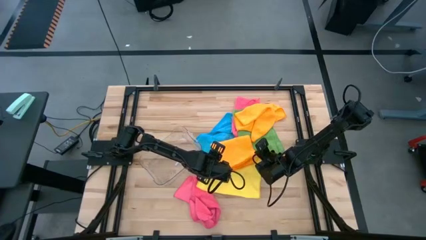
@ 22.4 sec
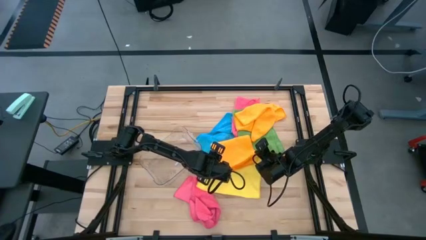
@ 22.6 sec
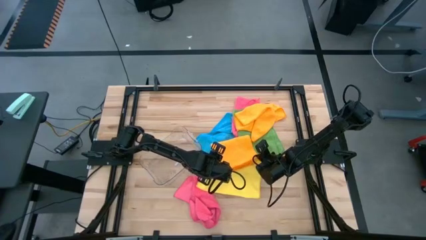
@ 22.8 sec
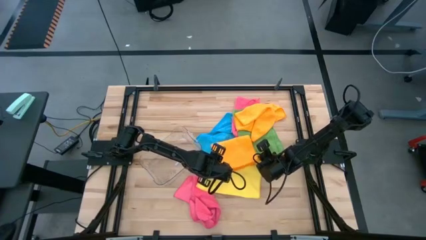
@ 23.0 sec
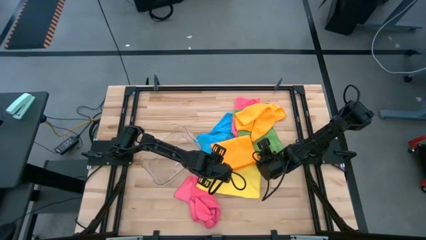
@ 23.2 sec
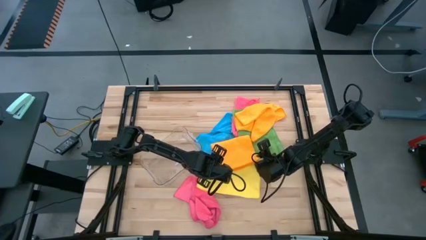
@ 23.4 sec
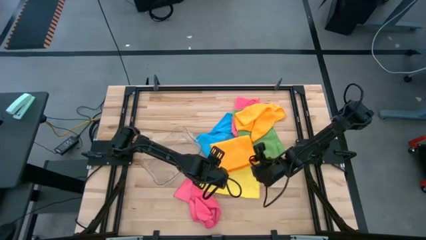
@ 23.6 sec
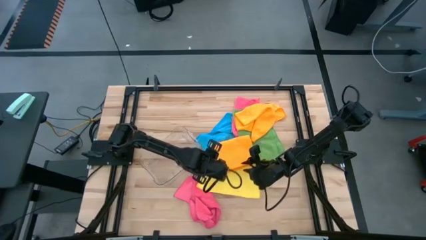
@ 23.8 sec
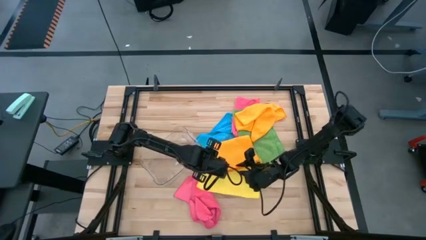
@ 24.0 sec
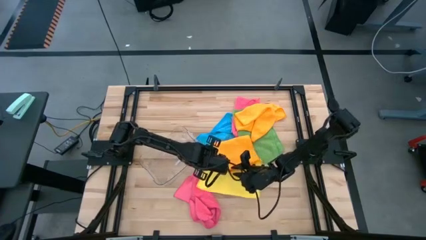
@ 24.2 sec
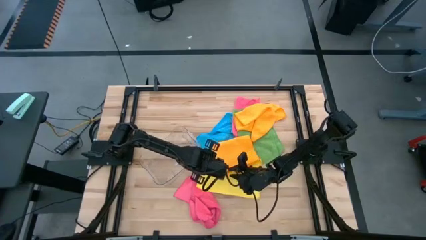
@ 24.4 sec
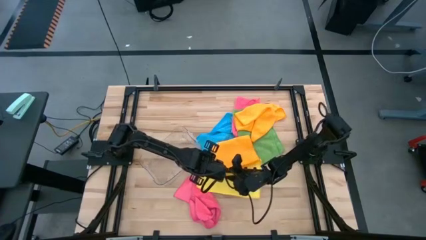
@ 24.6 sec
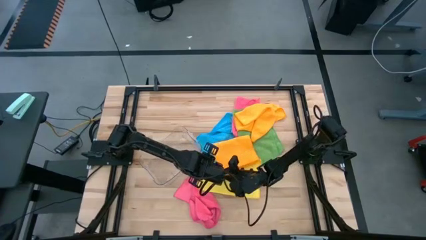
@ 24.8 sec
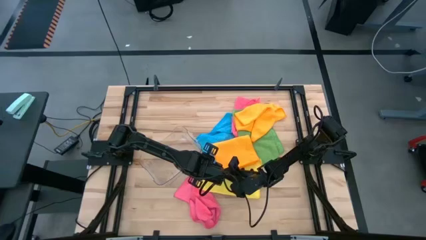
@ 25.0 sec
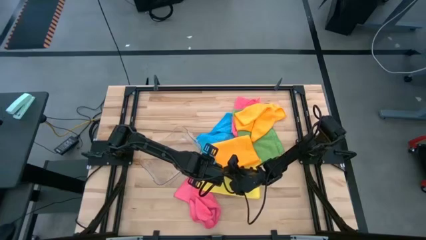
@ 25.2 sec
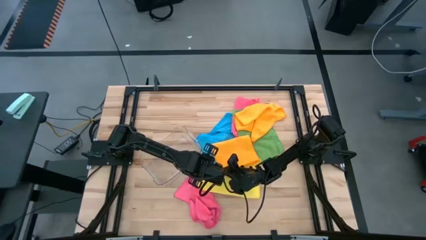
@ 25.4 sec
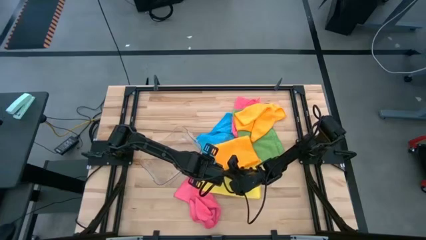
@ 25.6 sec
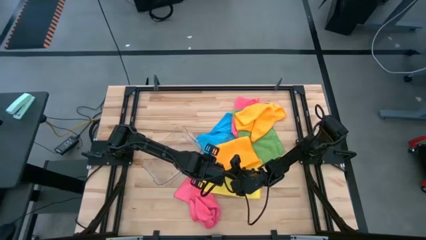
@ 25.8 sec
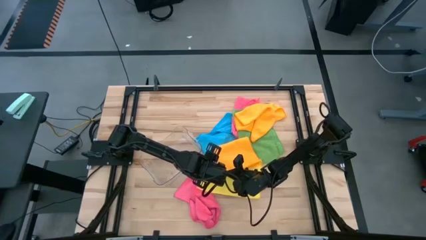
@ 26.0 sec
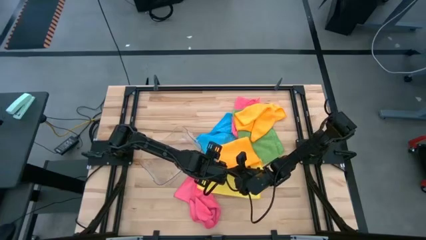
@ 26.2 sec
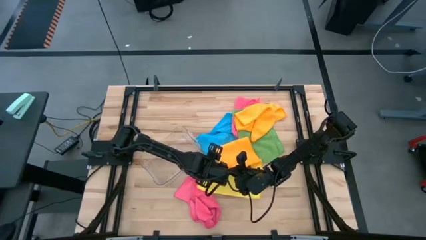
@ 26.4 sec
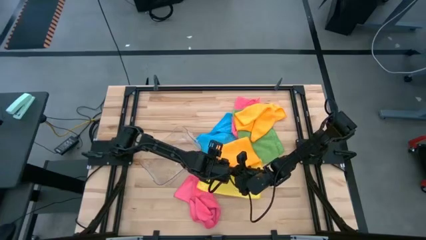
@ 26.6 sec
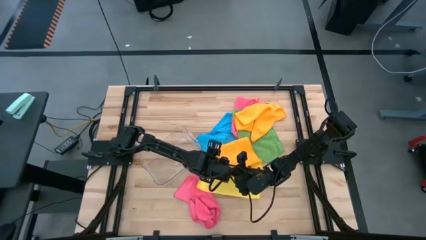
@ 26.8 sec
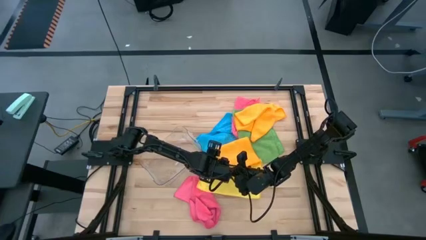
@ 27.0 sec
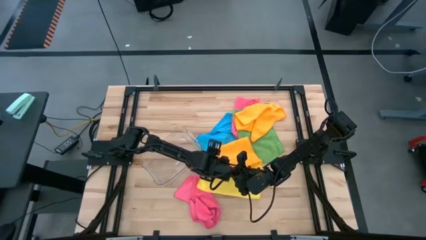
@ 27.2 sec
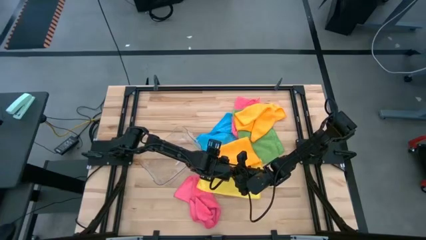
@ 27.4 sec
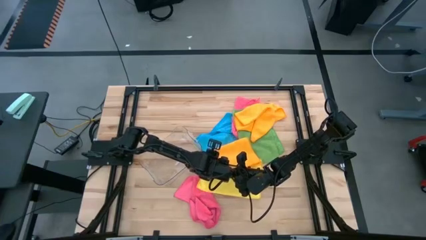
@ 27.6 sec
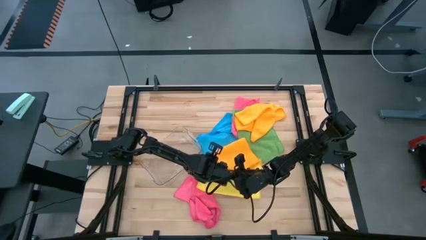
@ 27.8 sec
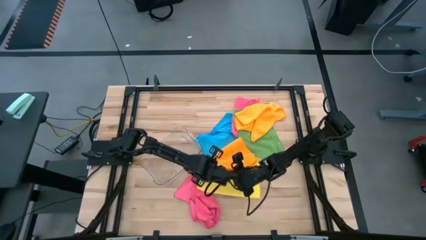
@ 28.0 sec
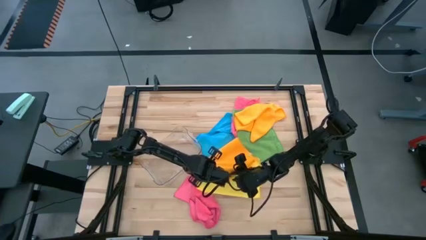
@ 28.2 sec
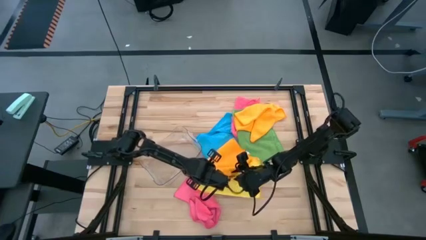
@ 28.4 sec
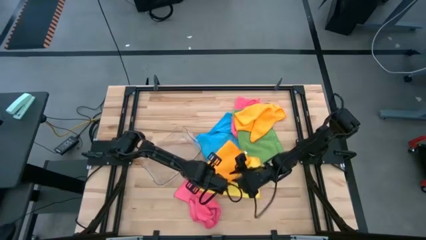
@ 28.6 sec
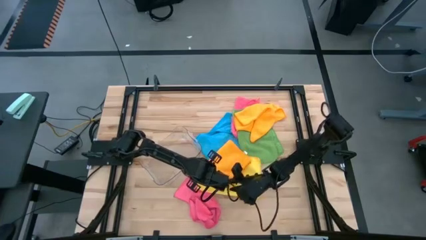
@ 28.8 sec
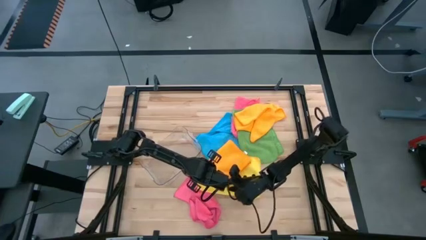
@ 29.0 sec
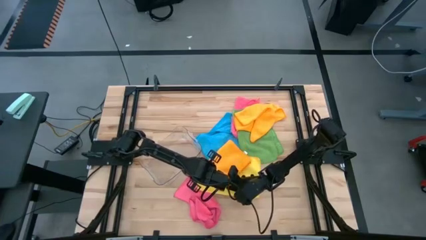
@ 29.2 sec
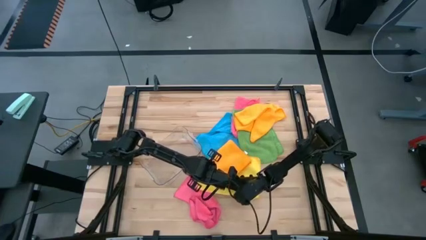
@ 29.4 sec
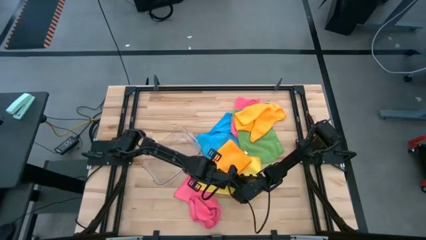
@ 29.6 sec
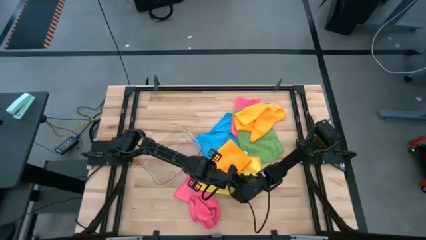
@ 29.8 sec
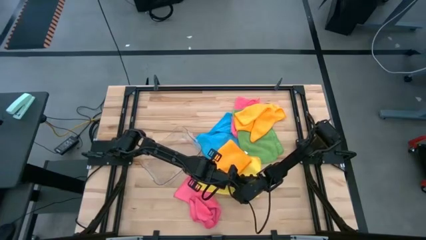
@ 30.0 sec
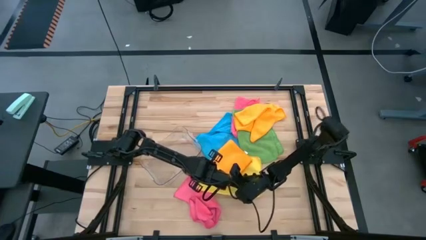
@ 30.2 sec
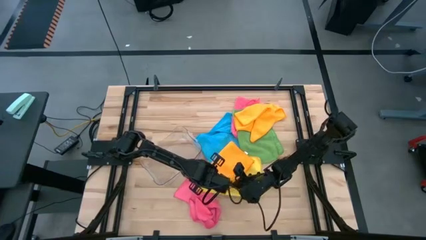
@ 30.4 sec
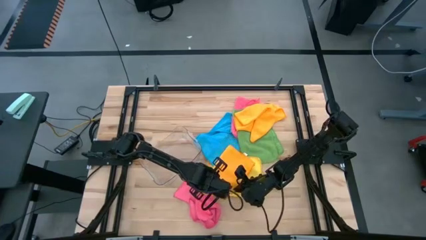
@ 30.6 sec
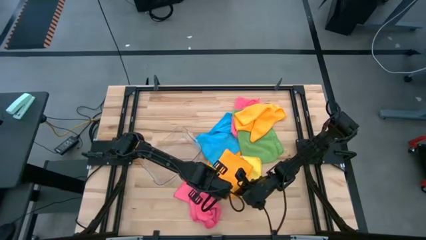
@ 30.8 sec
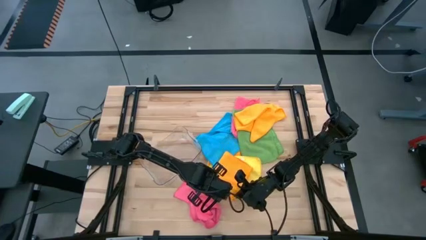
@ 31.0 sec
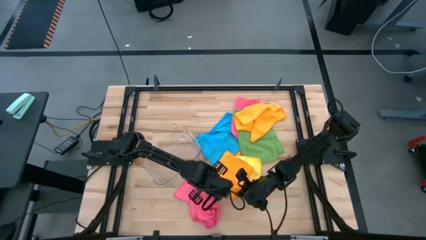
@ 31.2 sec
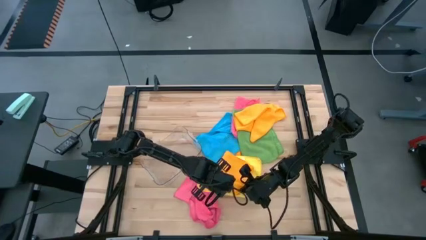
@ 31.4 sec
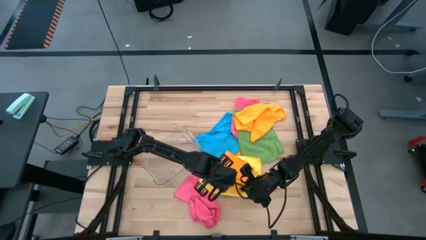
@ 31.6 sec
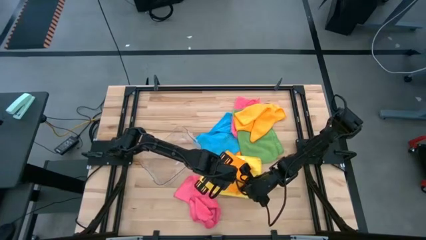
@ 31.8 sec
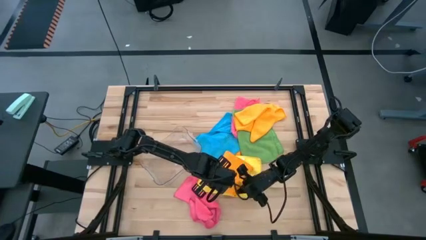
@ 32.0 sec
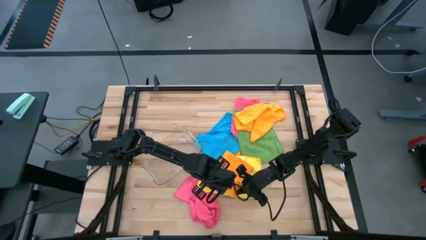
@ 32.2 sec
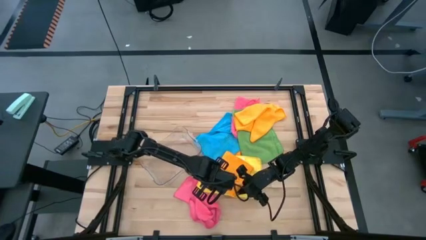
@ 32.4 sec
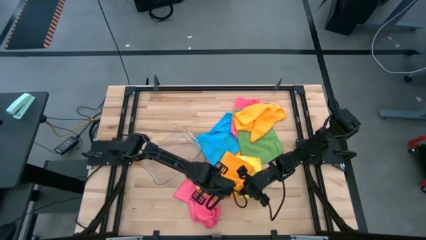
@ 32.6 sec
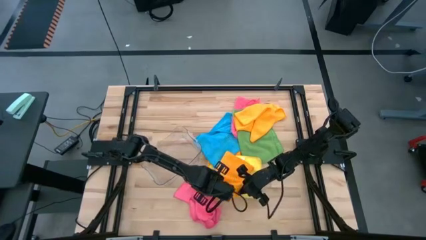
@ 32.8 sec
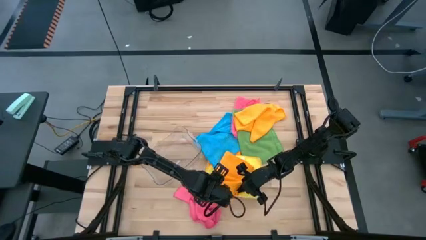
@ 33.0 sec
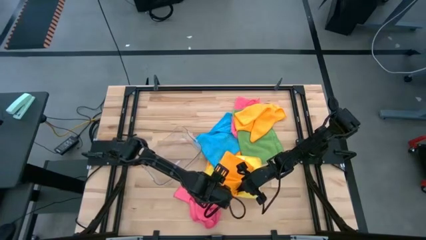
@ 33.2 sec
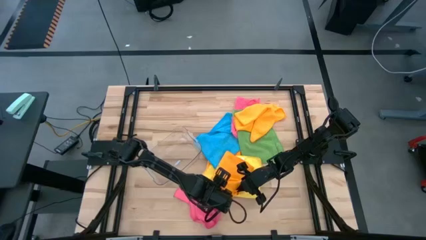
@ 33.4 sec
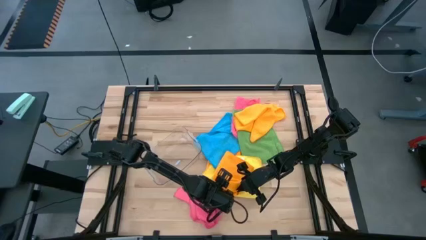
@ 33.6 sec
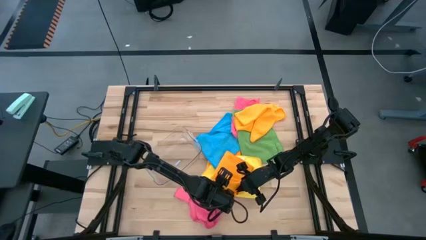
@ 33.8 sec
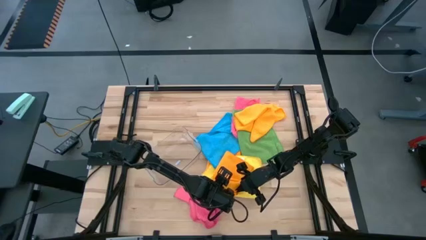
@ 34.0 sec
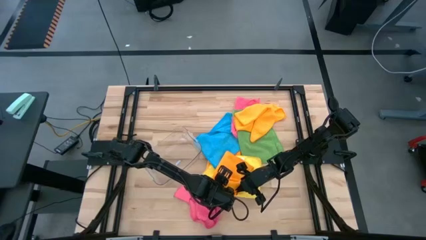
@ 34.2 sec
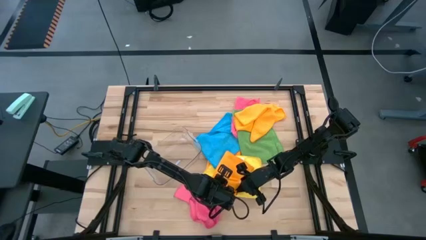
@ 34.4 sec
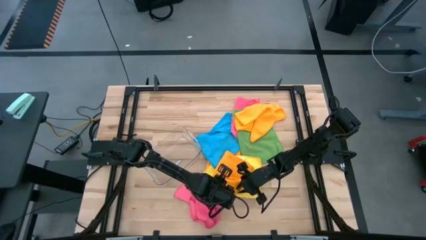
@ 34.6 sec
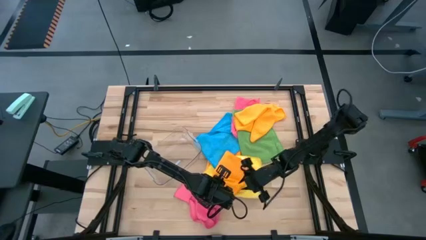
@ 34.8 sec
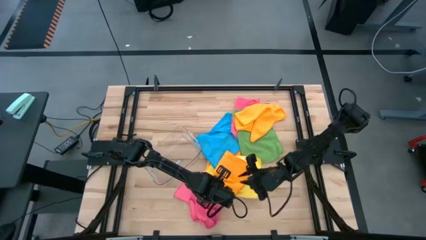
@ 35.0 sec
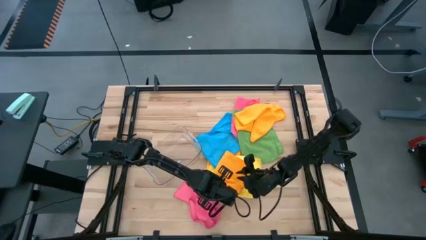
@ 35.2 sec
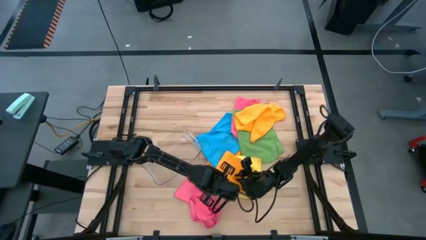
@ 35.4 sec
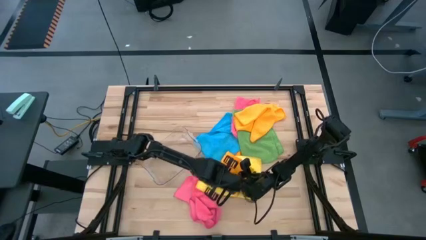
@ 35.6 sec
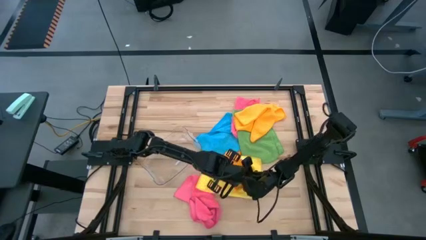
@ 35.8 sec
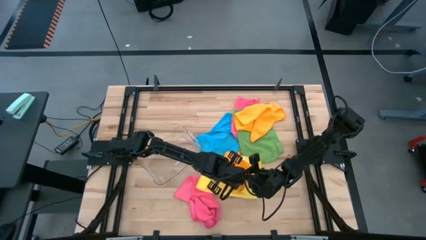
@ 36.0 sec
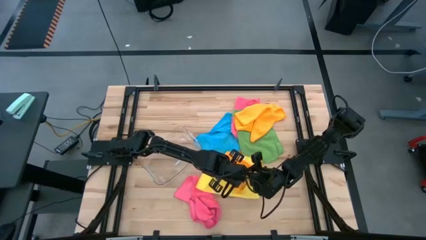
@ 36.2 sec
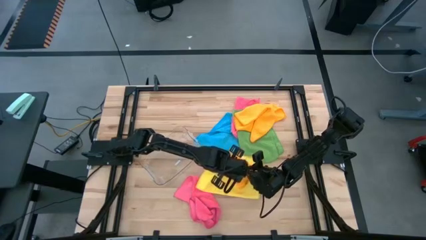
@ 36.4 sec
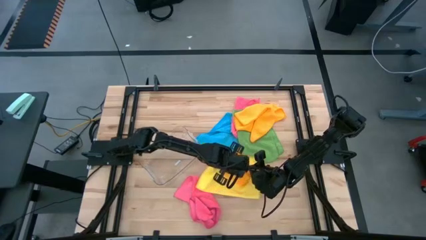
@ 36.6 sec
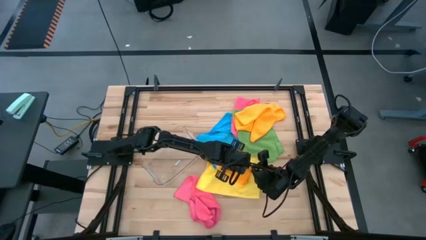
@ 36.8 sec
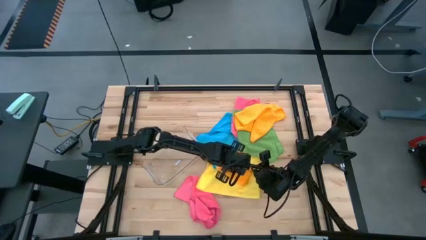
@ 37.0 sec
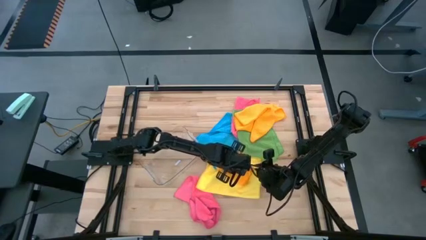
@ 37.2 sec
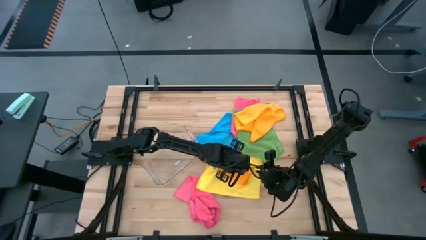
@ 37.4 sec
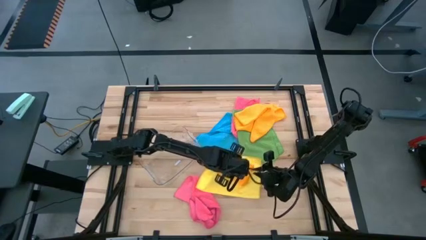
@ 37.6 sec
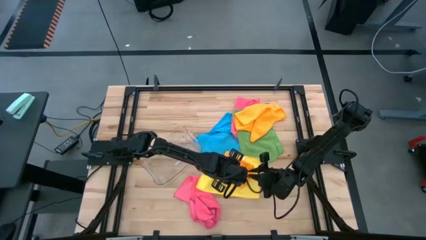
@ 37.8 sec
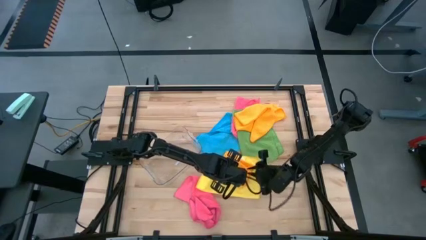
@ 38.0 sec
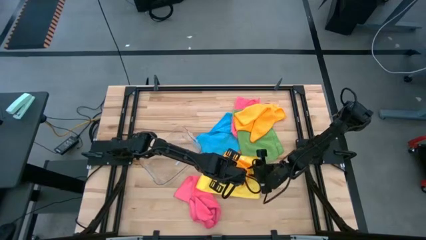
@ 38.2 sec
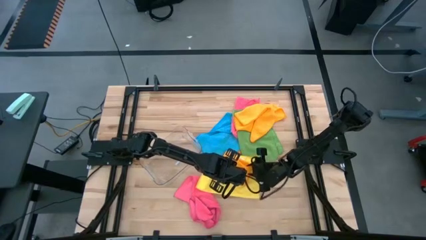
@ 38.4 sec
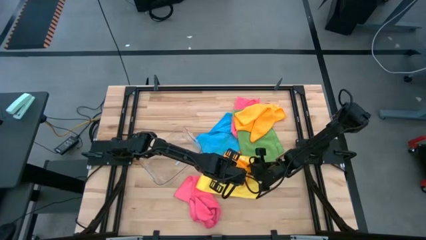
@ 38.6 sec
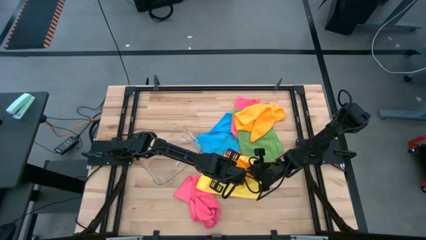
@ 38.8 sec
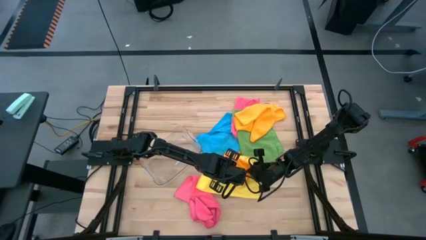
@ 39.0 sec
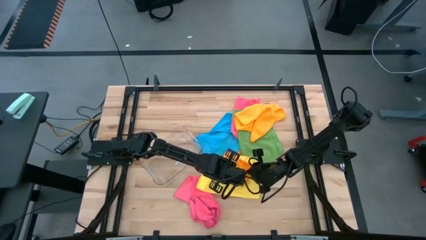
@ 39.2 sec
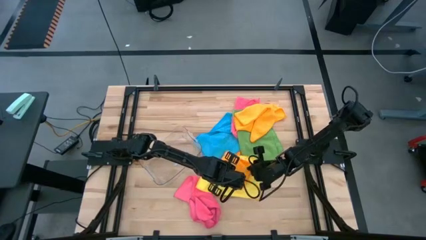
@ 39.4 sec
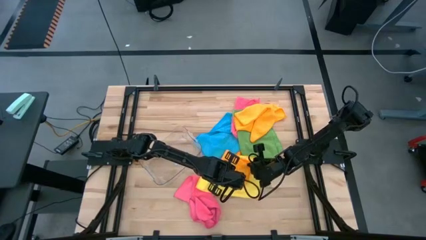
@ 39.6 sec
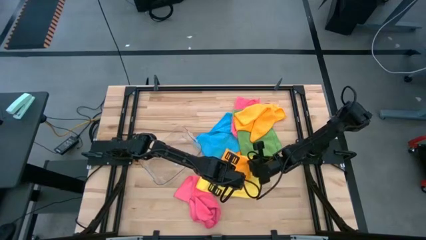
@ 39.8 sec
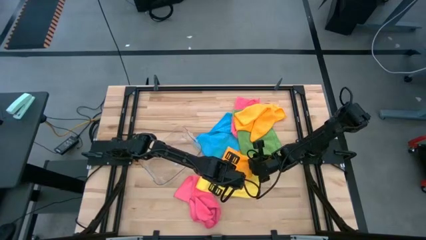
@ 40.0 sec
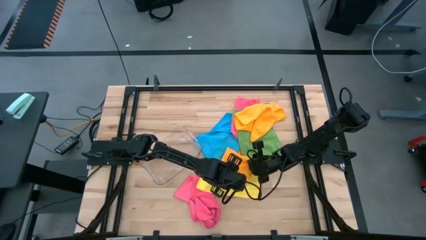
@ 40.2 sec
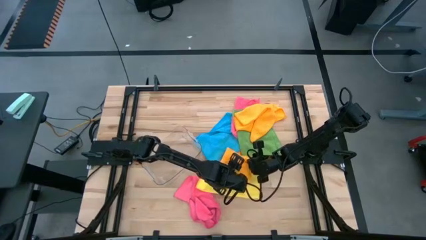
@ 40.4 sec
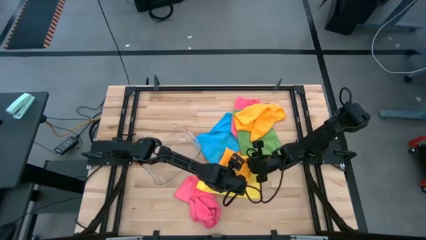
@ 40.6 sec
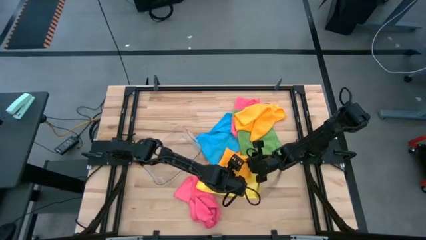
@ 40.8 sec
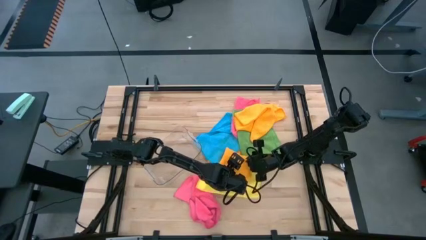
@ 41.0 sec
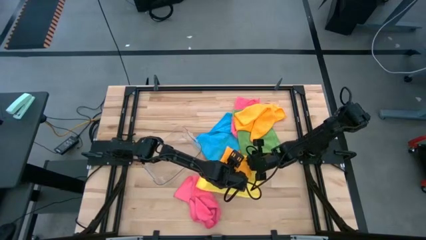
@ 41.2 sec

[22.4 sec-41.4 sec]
Task: Fold microfiber towels
Fold the left orange microfiber cloth
